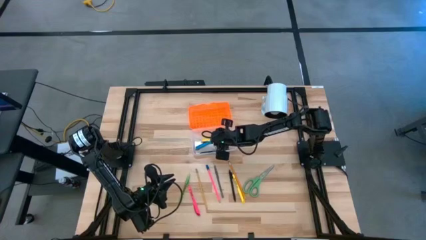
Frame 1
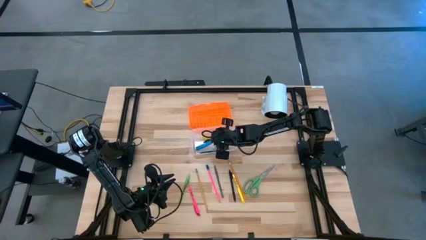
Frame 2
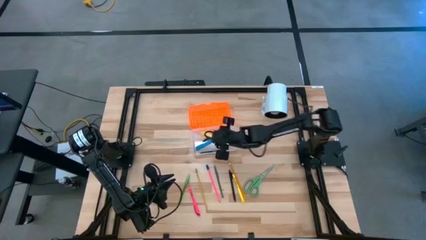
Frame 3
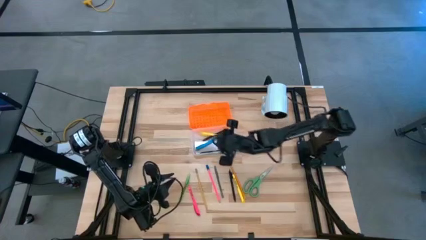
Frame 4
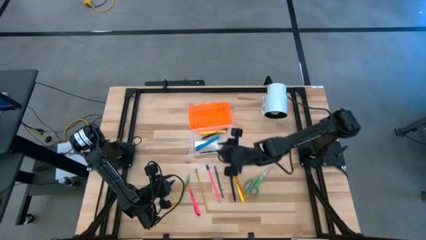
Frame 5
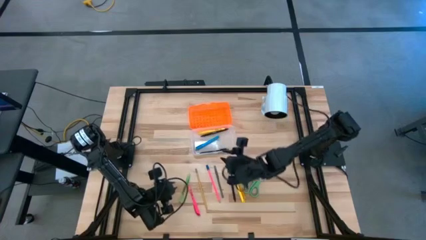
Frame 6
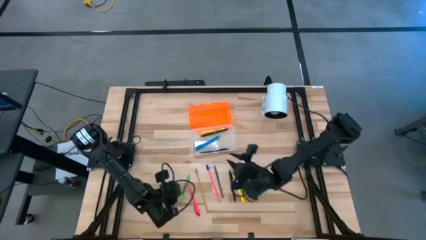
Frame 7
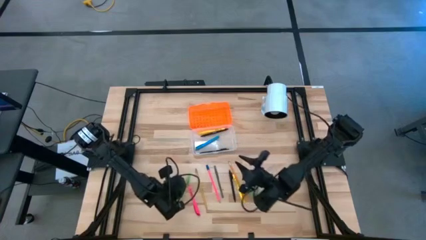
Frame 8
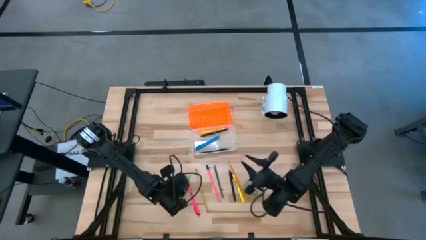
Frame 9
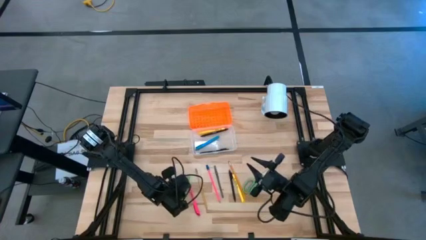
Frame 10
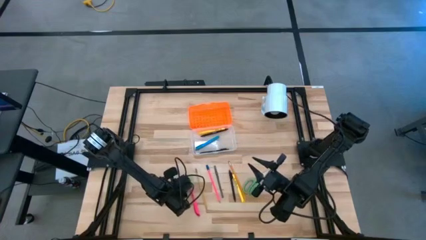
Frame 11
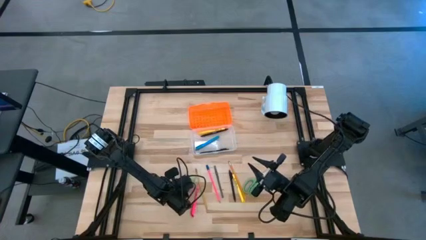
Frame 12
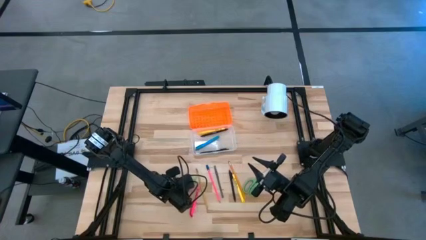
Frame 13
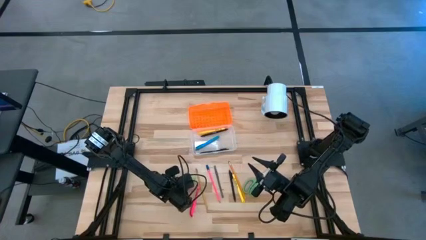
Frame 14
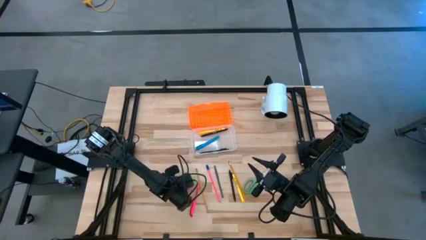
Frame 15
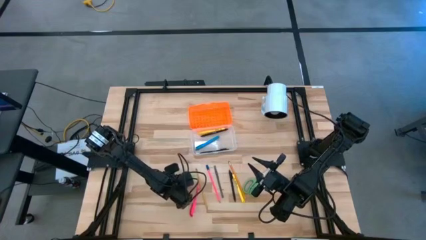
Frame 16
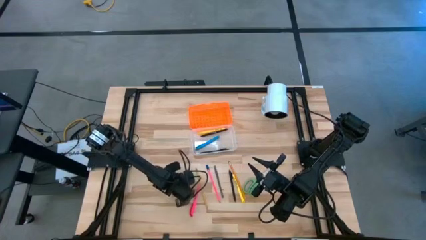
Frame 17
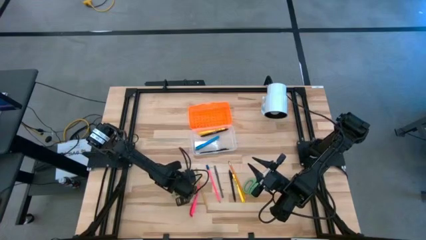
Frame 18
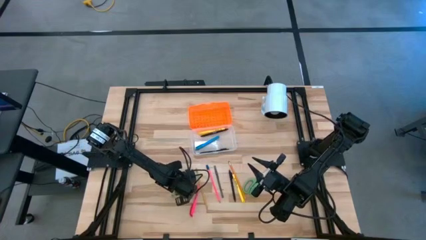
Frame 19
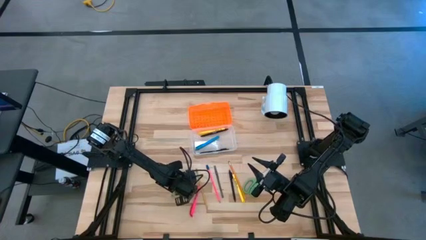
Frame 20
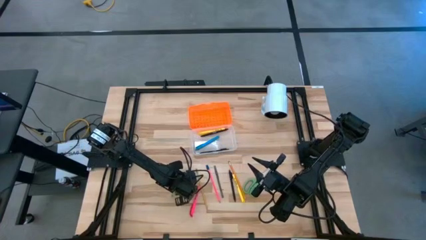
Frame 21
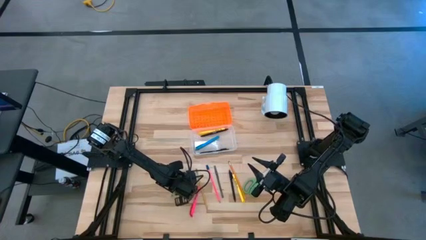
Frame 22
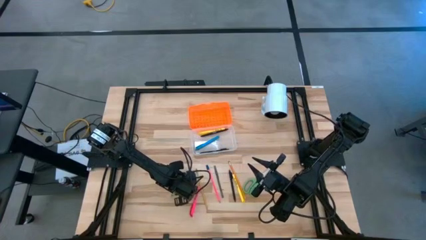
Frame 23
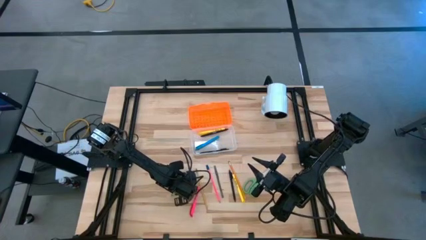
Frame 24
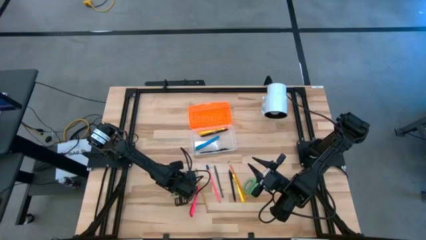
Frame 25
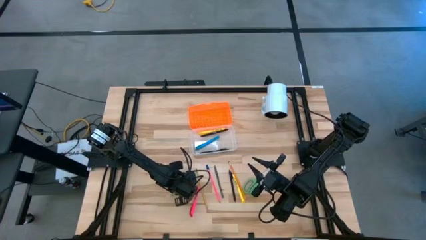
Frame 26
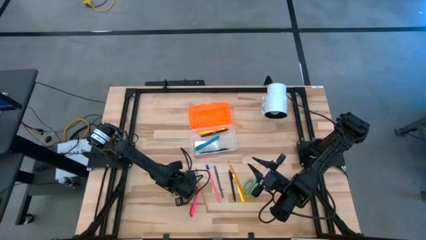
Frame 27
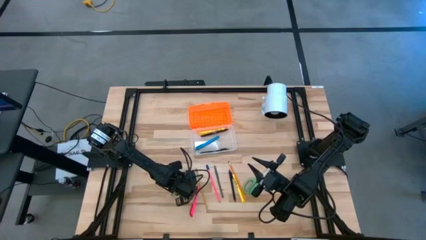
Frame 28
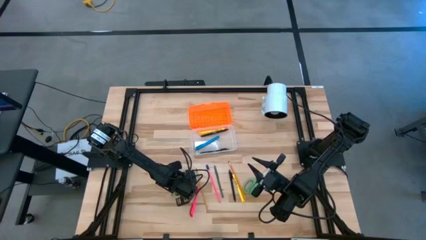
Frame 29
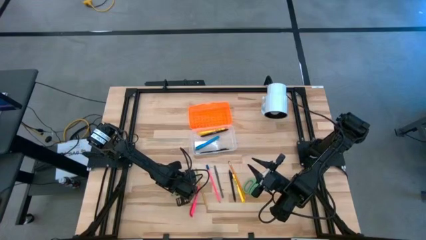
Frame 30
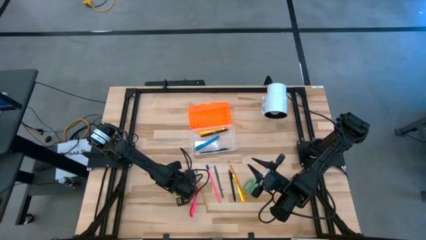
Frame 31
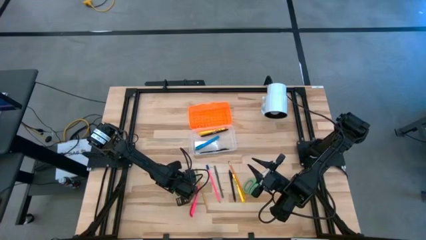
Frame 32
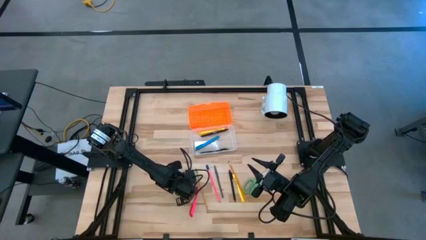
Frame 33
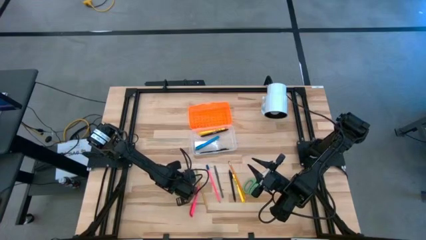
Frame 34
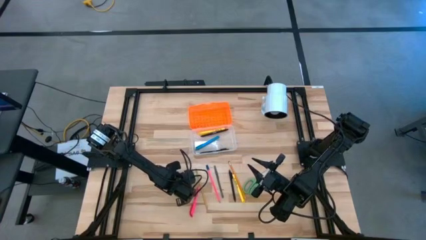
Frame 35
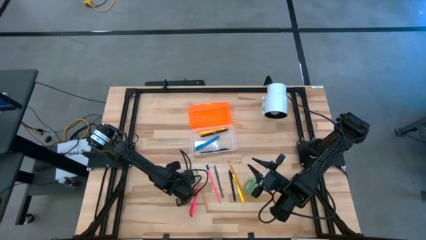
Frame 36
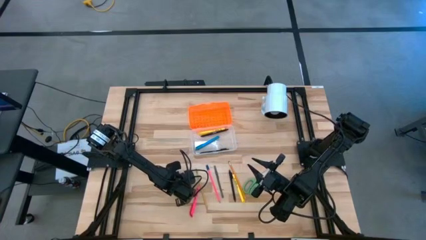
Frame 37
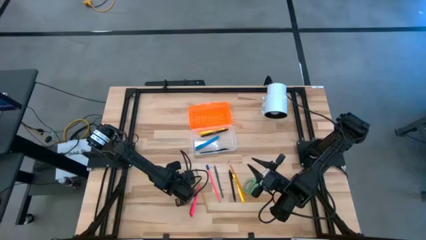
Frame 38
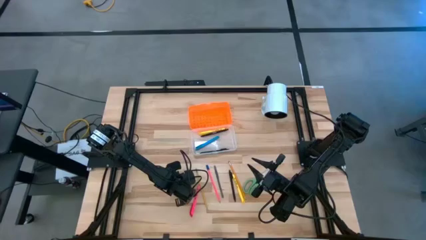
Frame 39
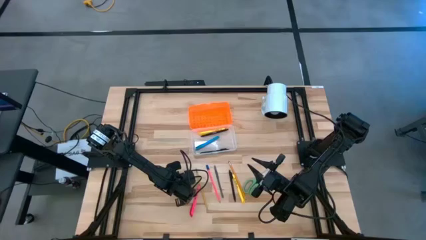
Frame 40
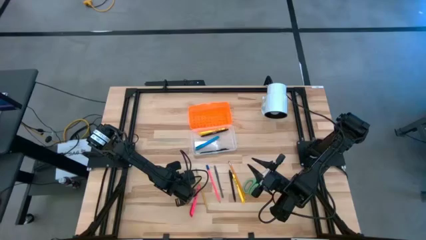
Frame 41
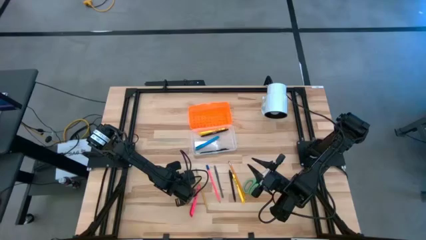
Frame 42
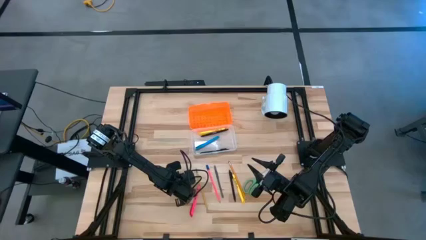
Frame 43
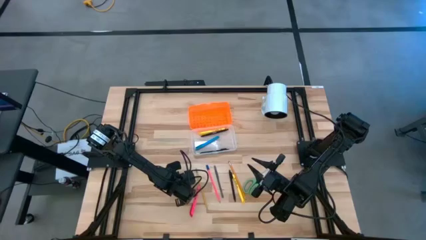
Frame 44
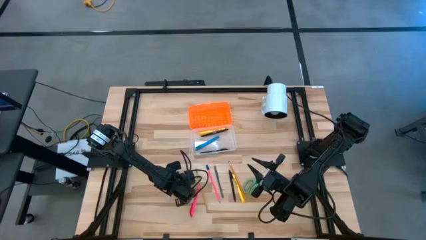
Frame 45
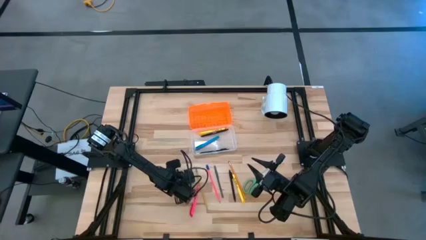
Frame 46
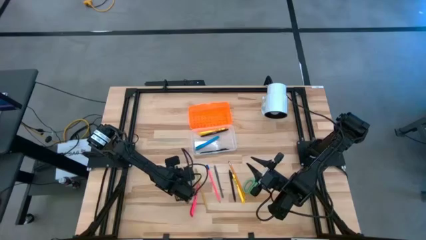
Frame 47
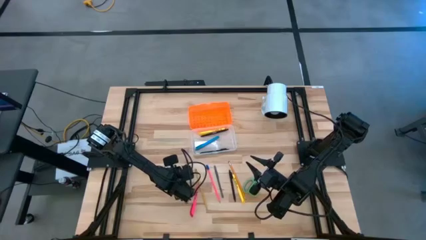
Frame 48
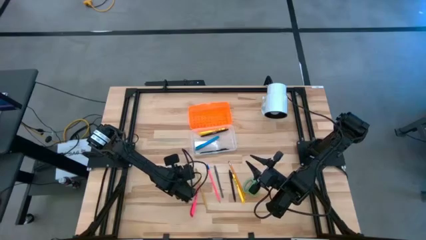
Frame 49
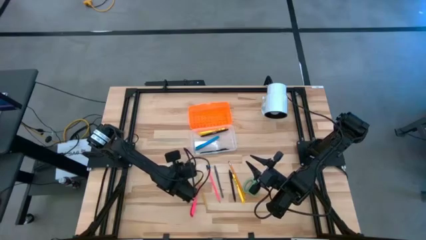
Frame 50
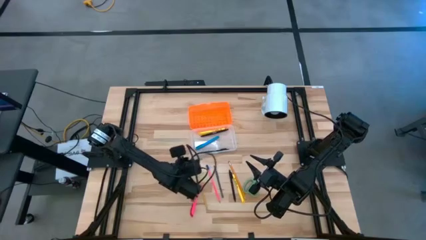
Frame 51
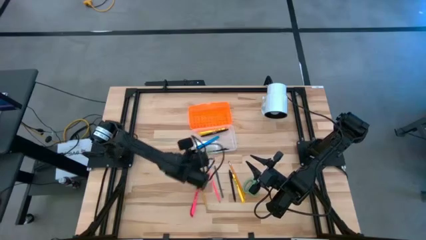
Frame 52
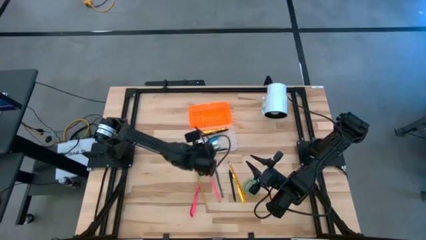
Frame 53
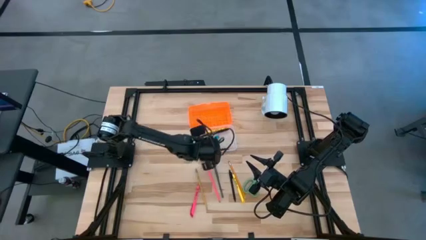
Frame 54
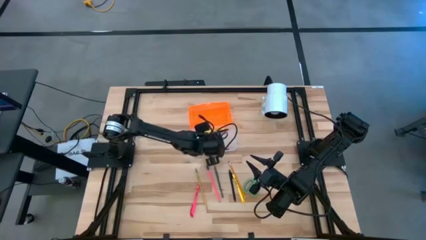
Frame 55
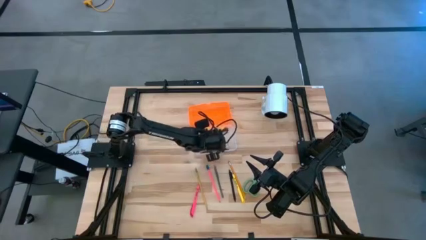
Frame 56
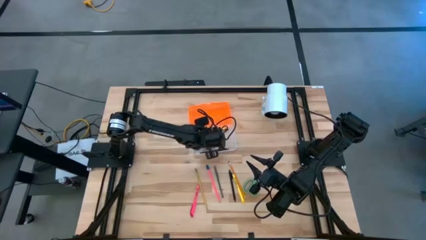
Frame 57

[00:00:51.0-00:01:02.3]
Task: Pick & place school supplies into a supply box
Put the green pen into the supply box

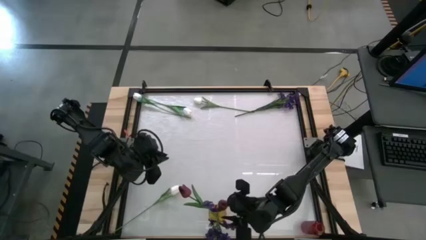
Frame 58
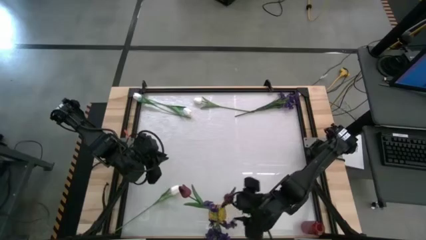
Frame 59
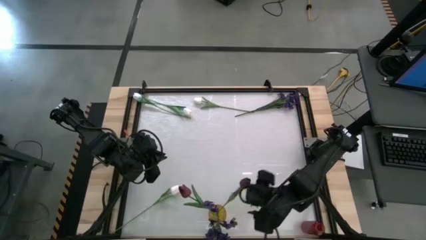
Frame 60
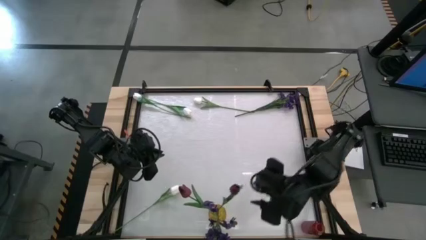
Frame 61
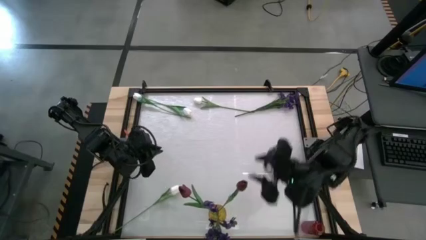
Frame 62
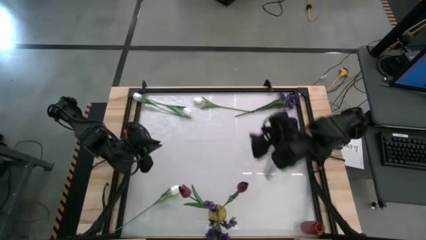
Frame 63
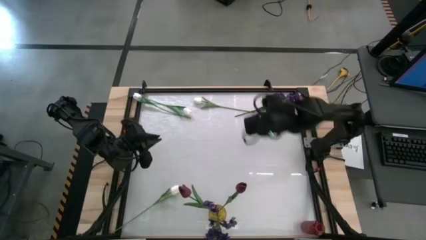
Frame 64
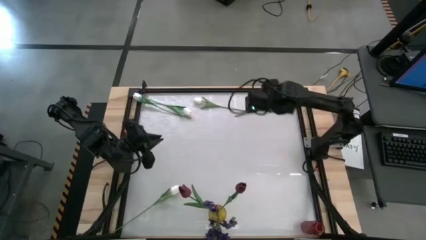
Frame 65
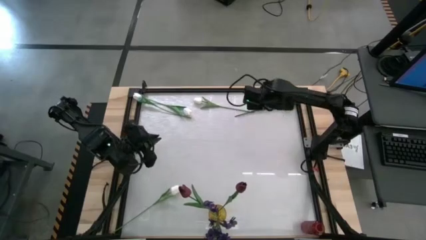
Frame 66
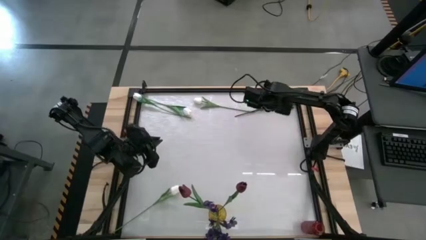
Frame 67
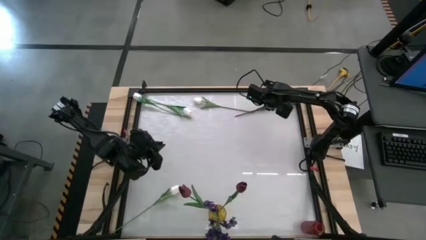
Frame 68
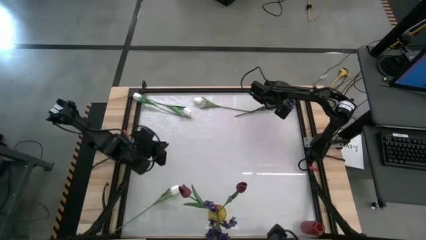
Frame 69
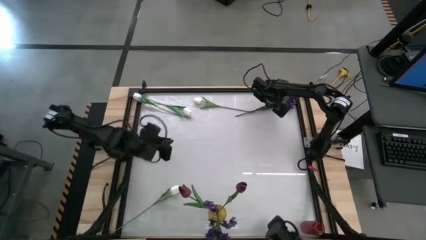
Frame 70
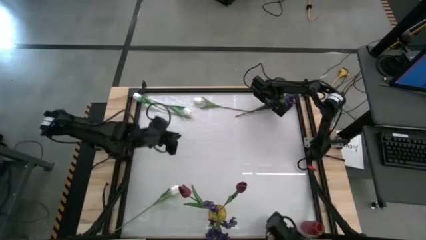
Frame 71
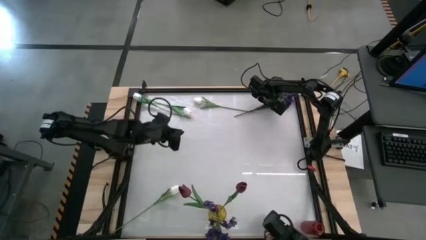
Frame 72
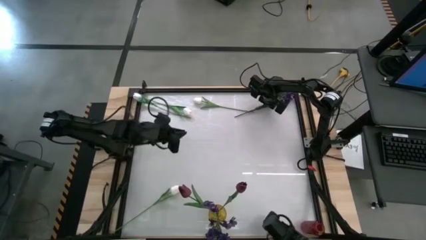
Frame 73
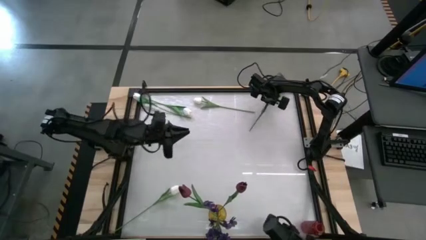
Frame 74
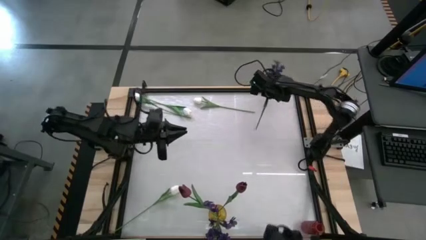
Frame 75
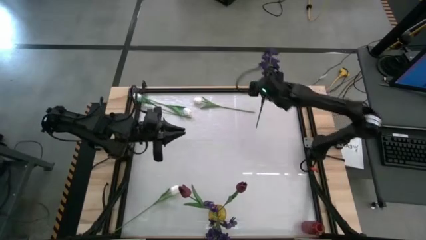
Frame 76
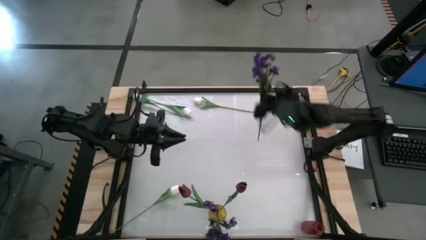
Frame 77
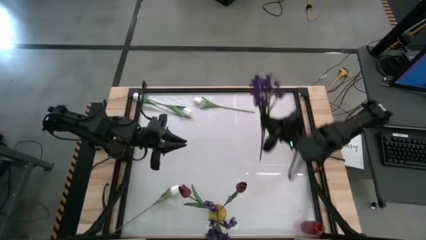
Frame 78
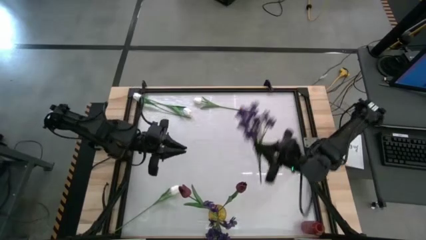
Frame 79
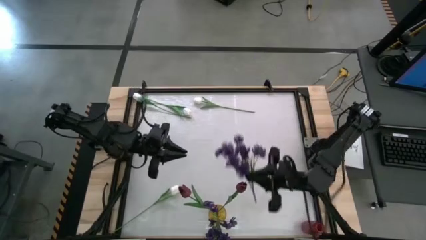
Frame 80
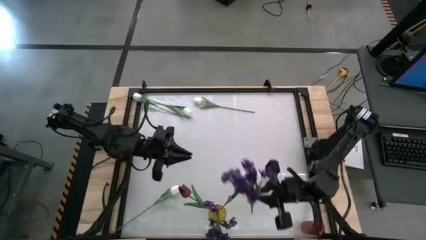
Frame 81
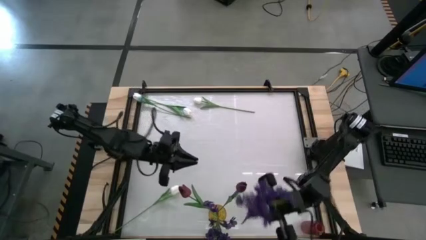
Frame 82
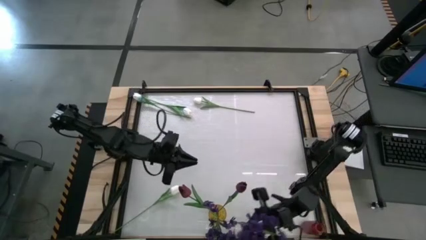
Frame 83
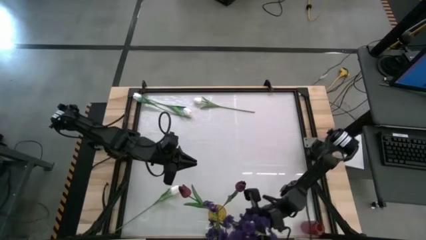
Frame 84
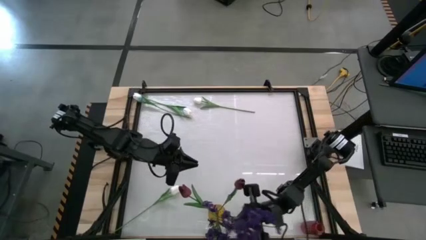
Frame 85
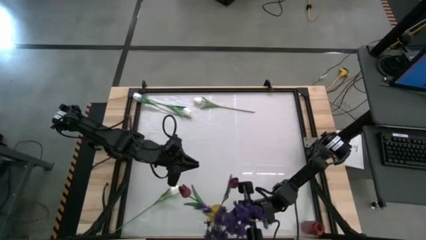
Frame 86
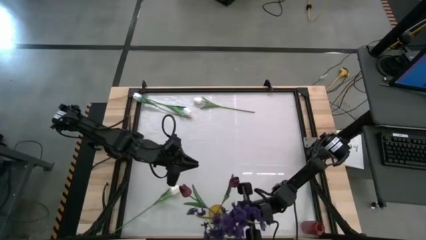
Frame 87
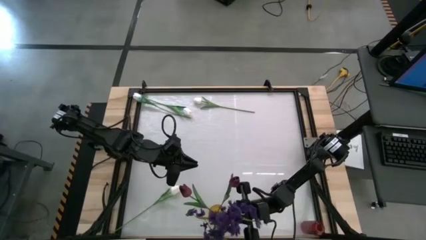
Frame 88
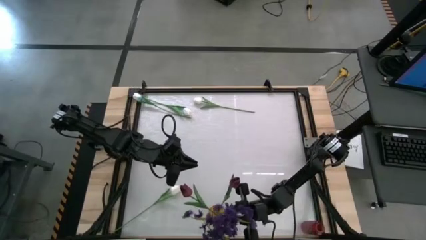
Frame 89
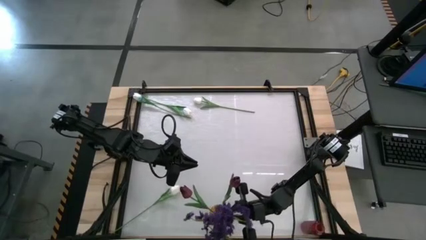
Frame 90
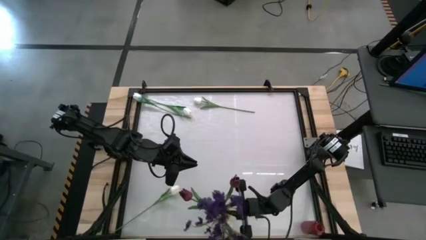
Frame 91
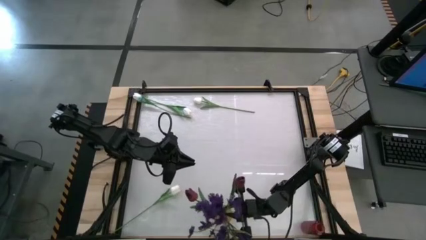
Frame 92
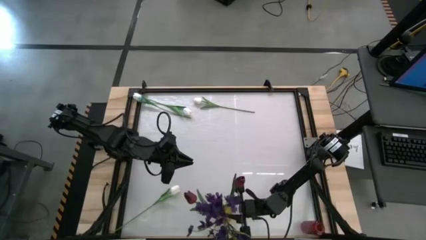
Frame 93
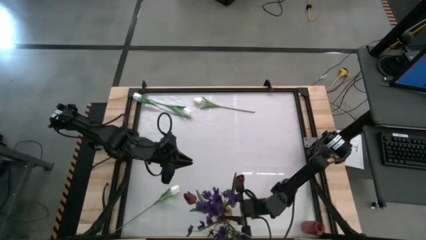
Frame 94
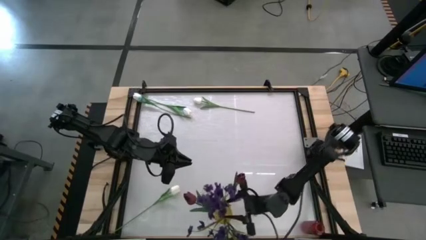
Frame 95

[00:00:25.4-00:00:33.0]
Task: Sort flowers into vase by color
Put the violet flowers into the yellow vase
